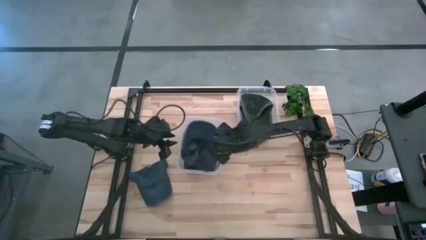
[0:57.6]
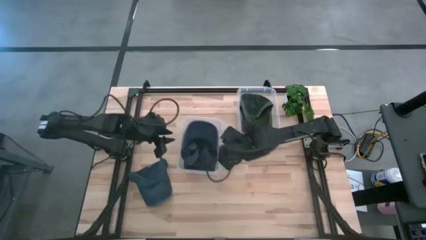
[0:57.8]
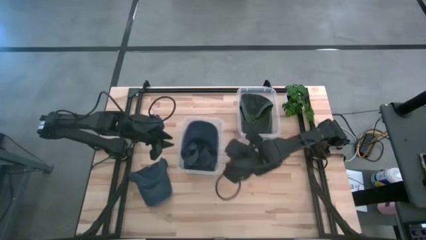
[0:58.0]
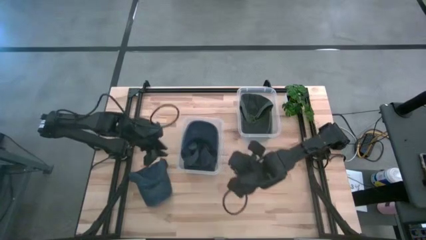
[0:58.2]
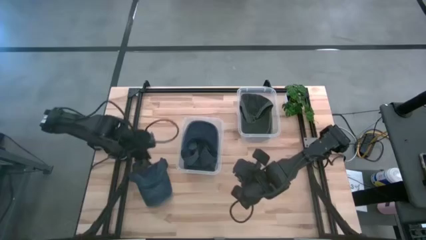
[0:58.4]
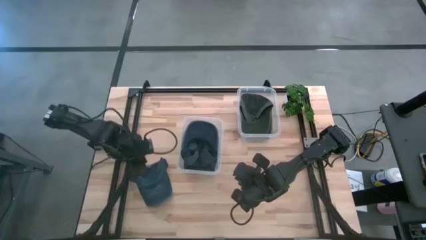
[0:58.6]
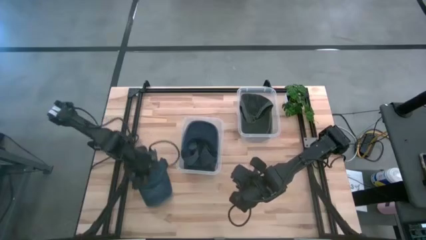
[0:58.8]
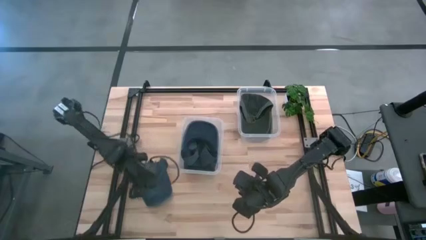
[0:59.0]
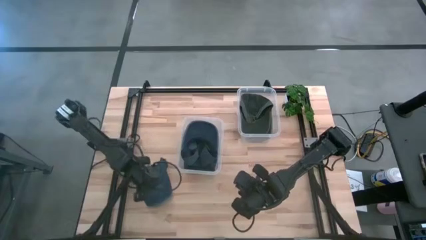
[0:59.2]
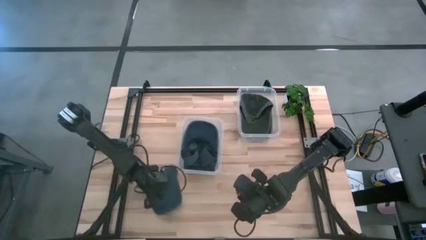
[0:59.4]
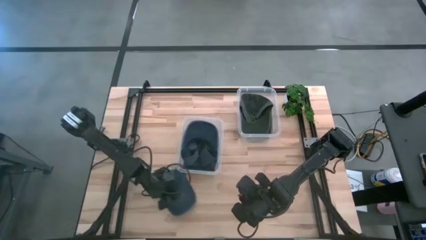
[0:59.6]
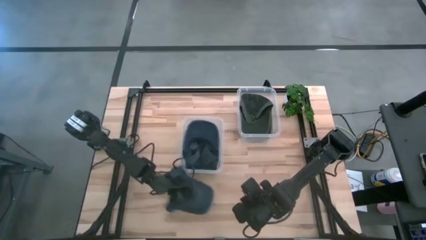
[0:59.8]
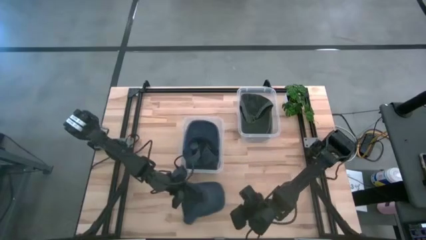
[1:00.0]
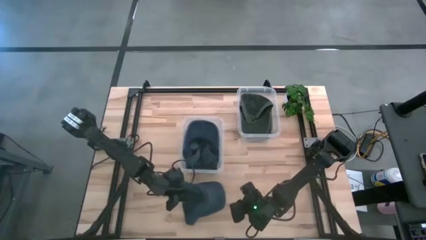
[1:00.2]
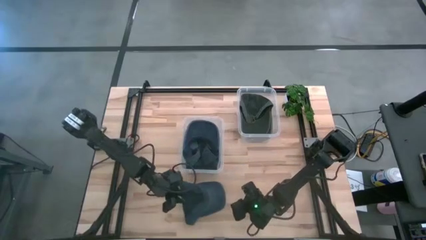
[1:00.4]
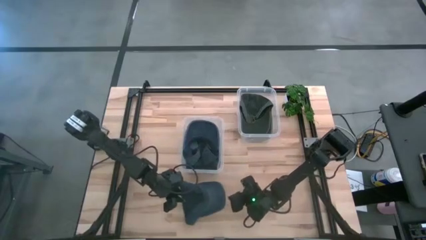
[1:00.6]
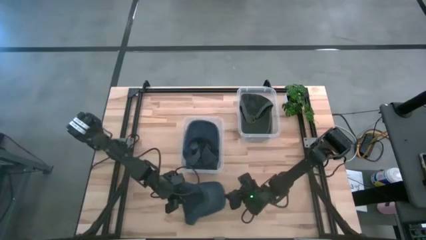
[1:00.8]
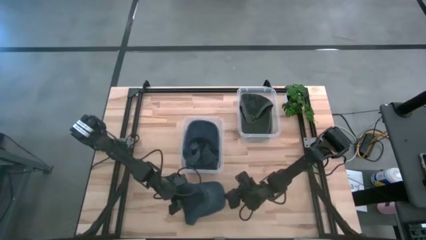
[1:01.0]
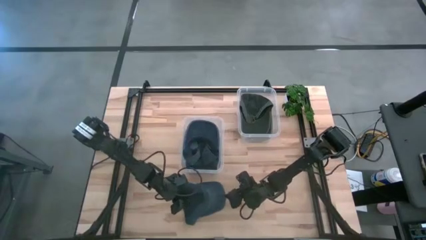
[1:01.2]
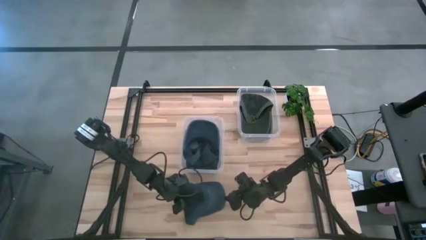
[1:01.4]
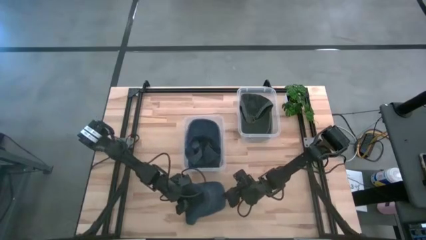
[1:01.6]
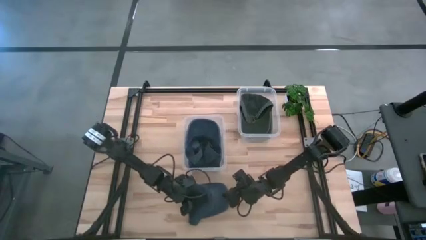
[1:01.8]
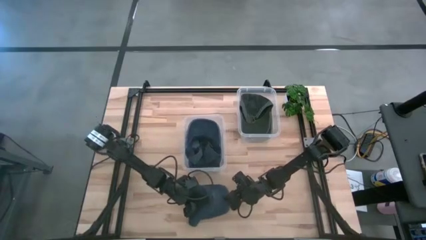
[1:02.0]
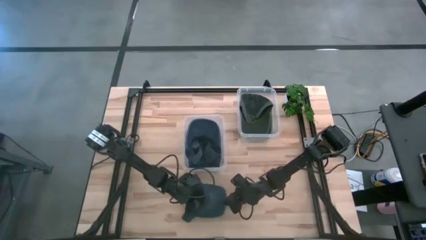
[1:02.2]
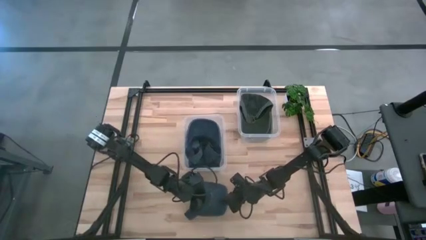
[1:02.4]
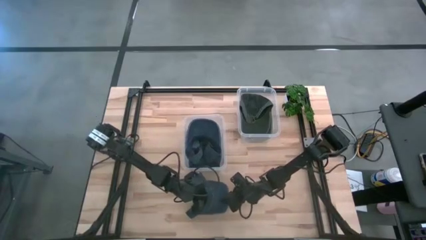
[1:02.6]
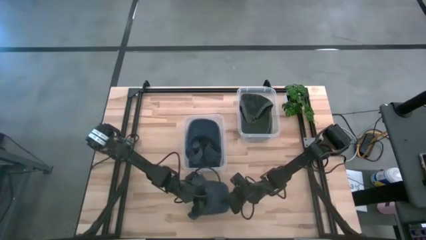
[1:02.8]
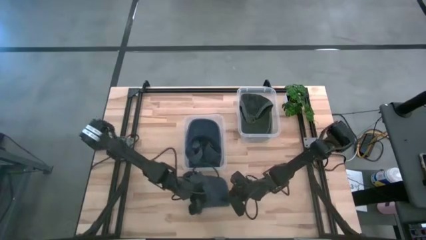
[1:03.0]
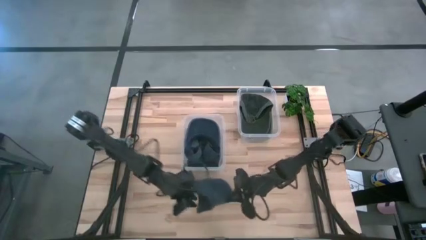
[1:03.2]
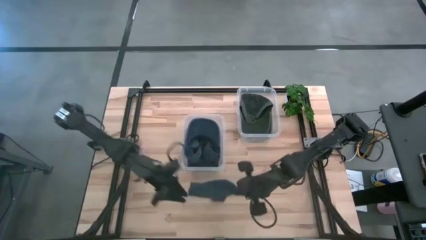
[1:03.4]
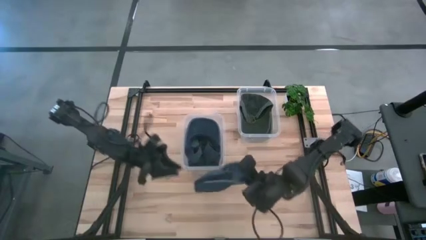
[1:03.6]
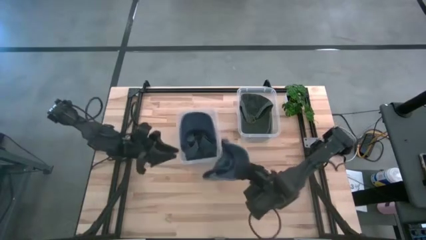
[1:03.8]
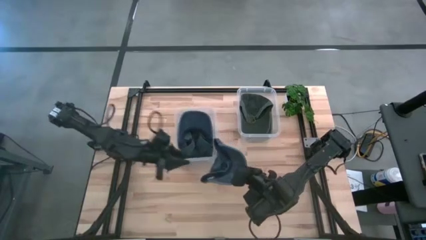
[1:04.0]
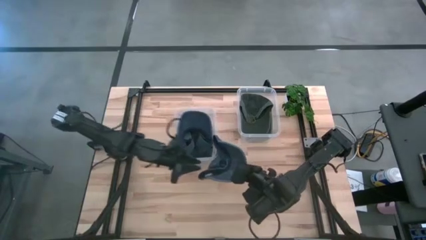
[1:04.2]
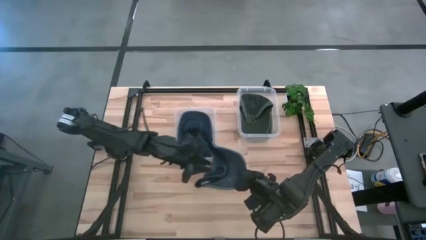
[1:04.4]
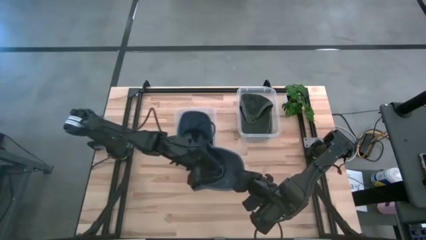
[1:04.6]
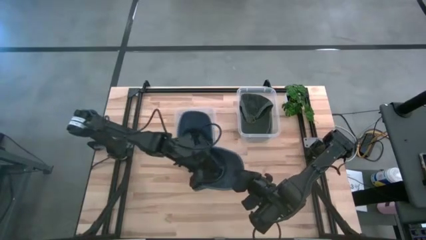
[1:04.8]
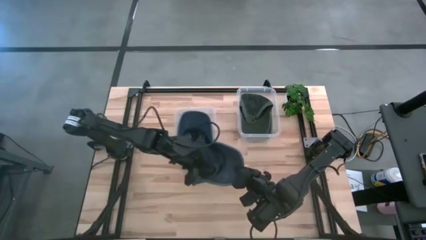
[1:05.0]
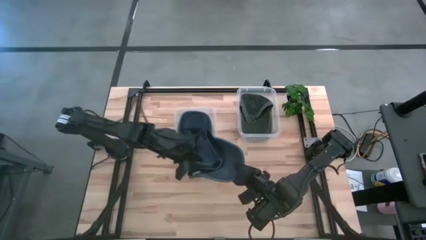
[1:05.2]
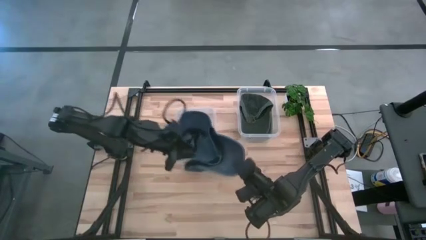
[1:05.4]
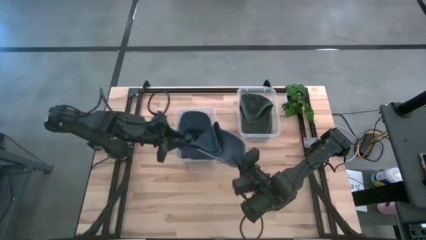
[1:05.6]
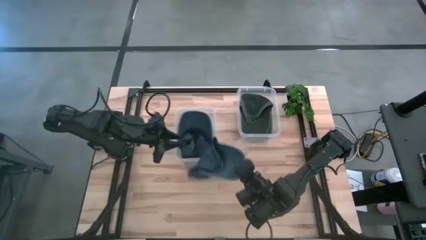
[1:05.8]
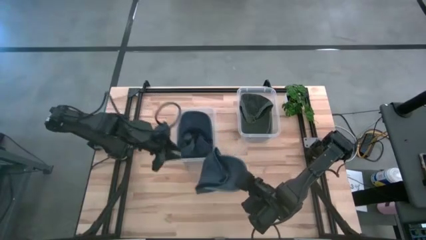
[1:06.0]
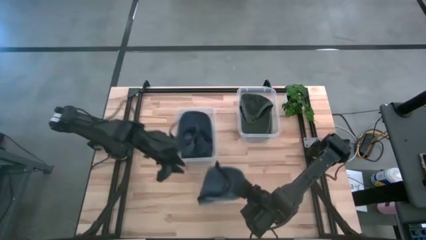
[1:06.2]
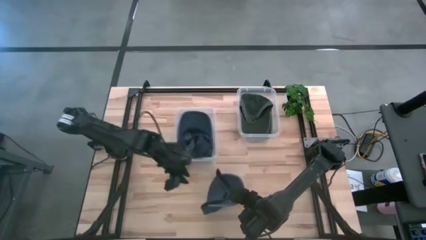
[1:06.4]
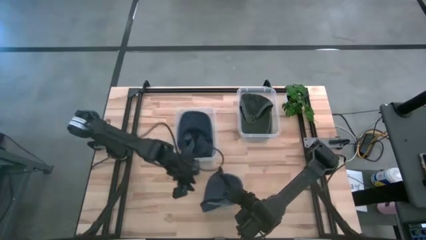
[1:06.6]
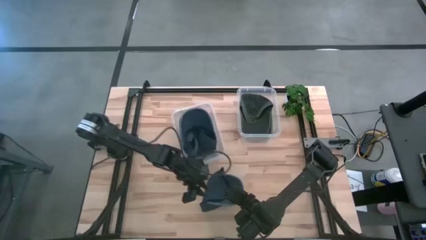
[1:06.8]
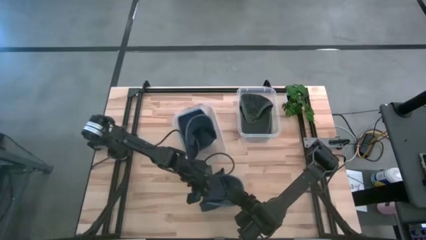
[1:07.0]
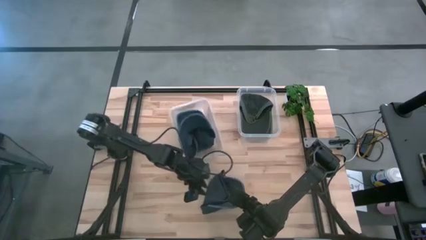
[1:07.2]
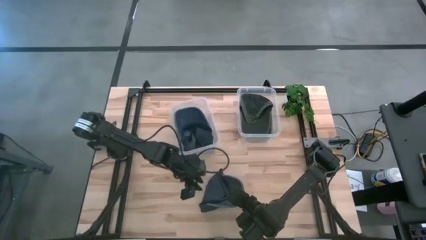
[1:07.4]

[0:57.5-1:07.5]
Task: Pick & Place hat
Put the blue cap into the left transparent bin

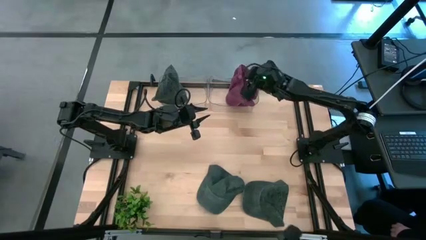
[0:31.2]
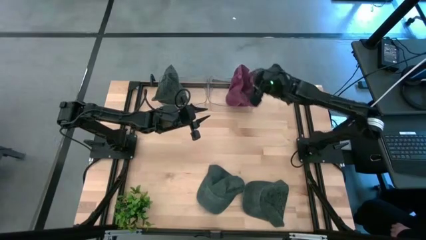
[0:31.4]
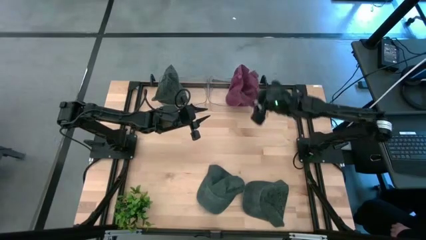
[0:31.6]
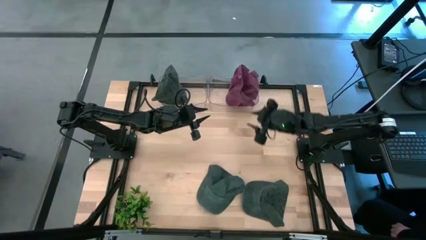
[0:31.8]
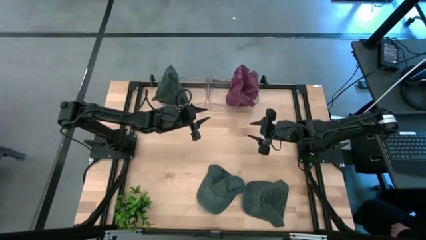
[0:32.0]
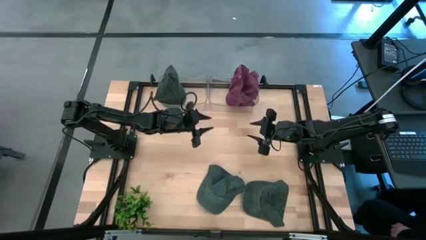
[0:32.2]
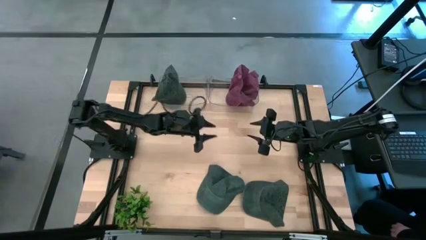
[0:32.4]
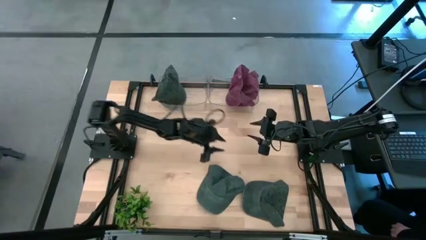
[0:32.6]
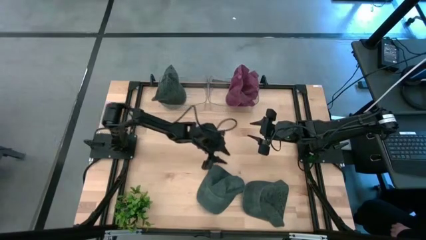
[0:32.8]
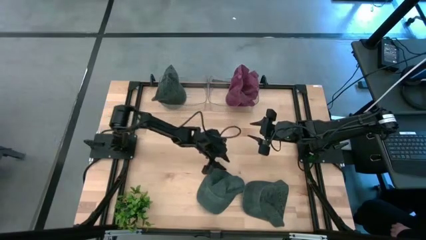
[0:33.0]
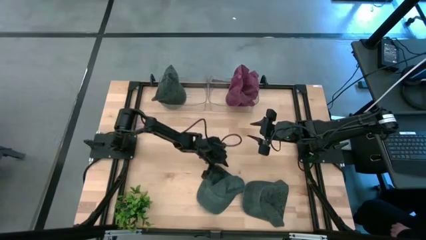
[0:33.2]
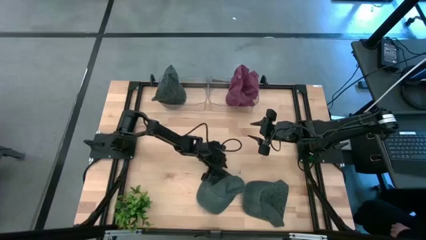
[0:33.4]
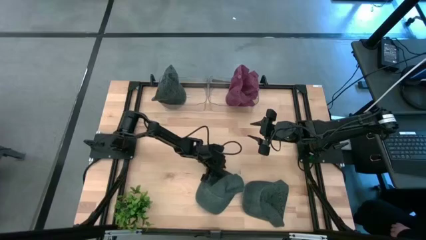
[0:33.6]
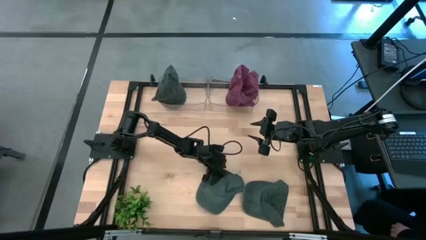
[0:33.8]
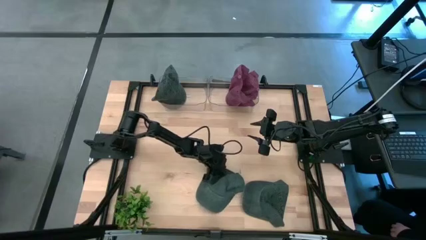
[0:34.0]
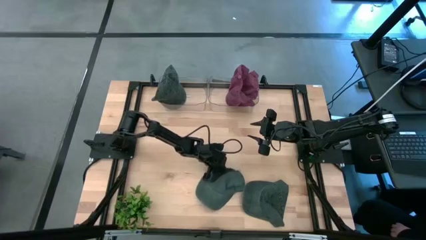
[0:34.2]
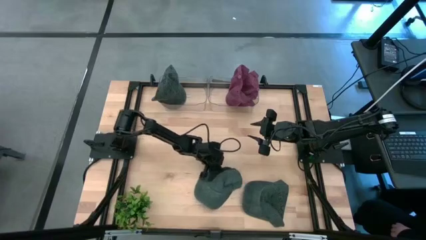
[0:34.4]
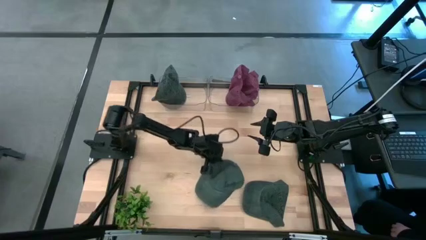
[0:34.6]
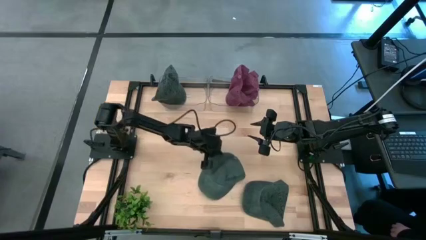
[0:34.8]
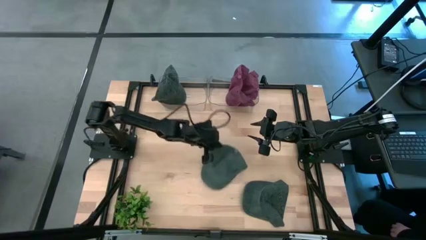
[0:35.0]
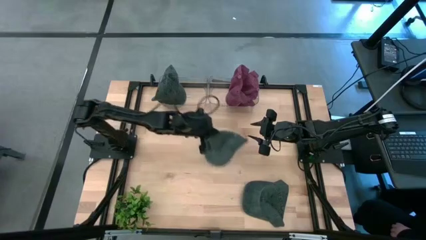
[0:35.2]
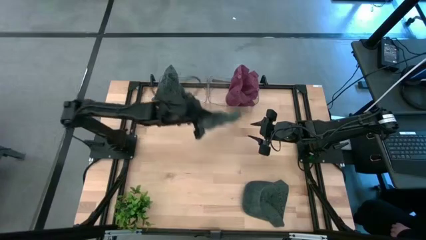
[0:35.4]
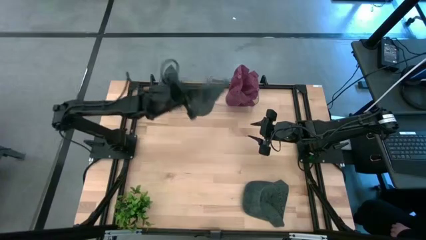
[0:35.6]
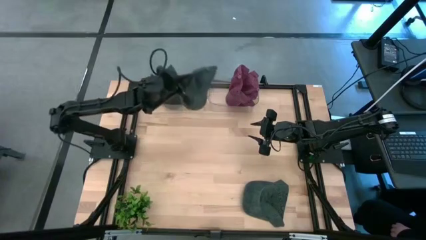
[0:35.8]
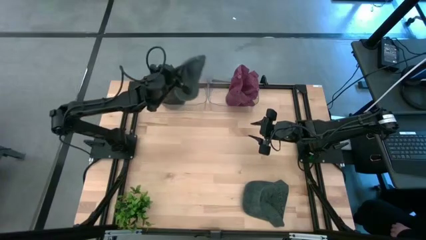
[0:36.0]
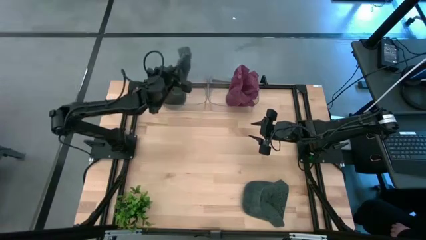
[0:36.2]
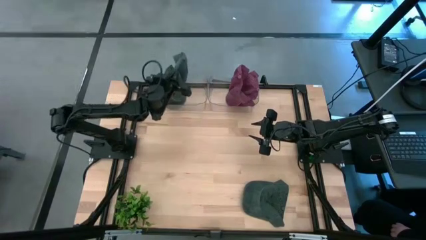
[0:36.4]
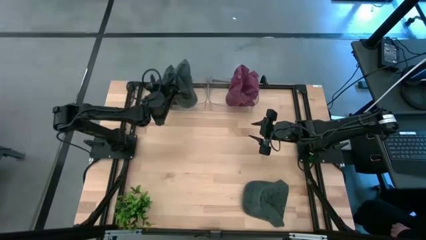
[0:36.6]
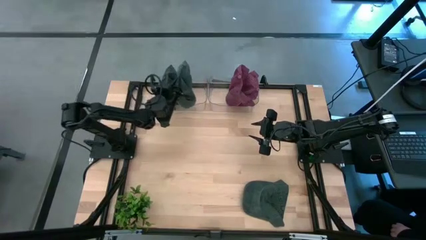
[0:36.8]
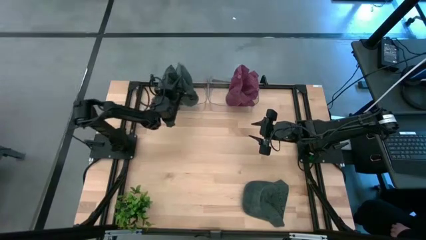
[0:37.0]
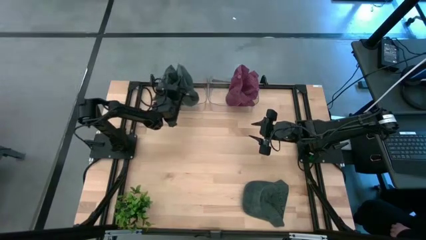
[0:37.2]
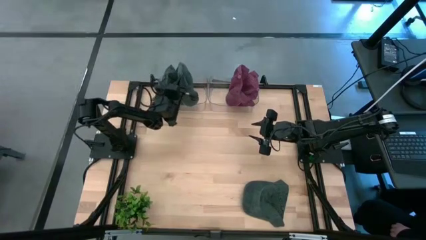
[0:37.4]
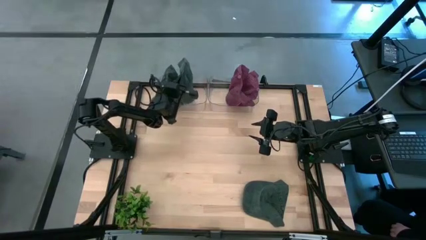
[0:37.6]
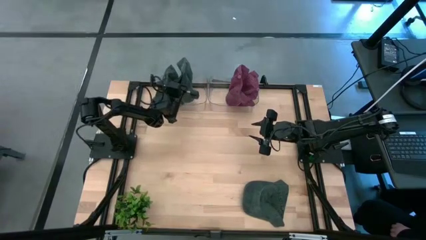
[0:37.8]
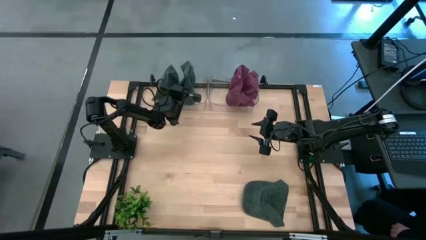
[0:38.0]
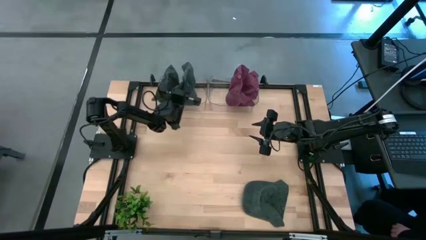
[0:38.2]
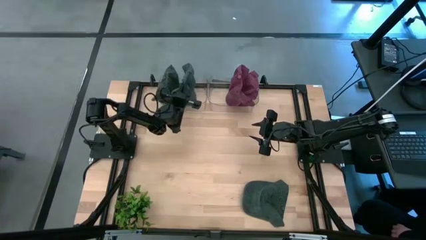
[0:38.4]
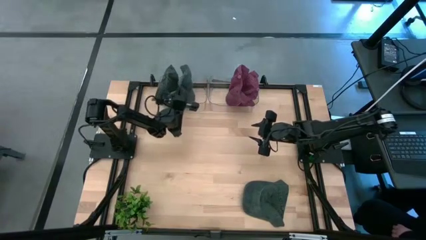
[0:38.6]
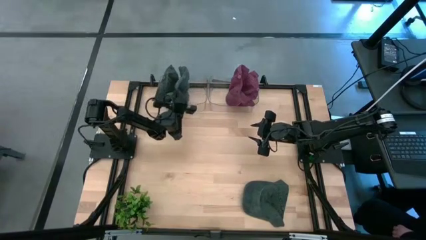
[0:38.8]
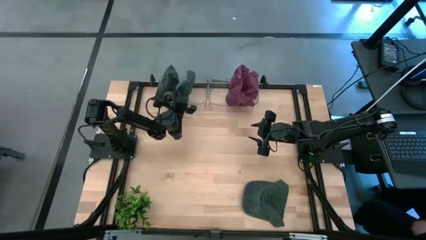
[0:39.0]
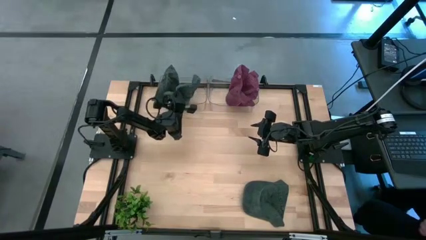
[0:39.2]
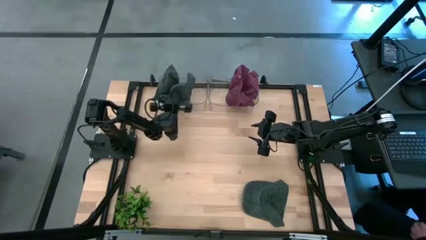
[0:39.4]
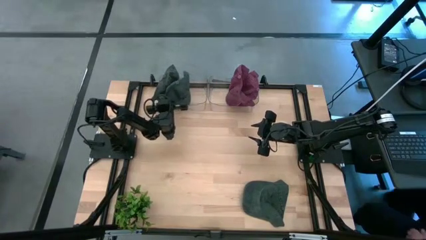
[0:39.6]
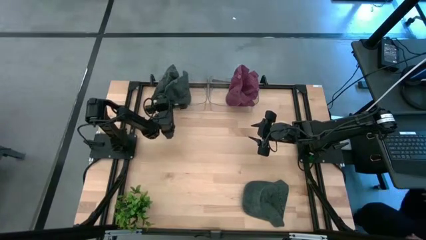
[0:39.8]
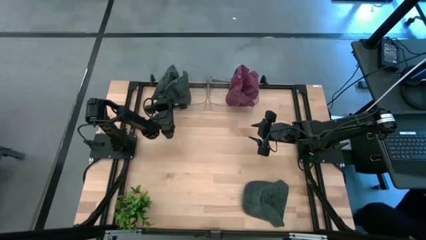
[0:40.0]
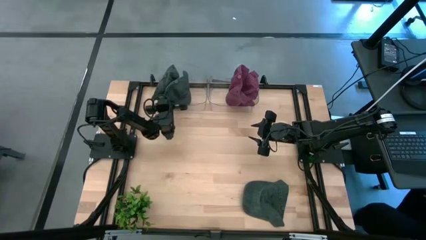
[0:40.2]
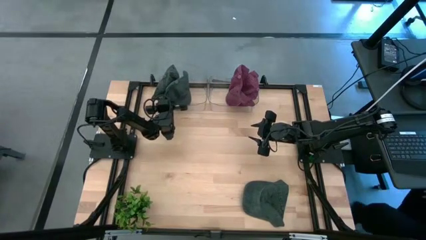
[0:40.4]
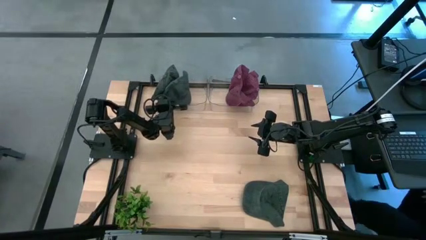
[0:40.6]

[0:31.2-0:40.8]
Task: Pick & Place hat
Put the left black cap into the left transparent bin
